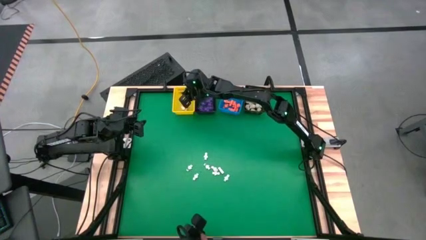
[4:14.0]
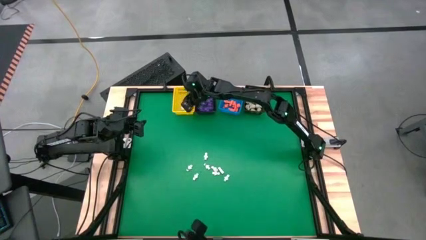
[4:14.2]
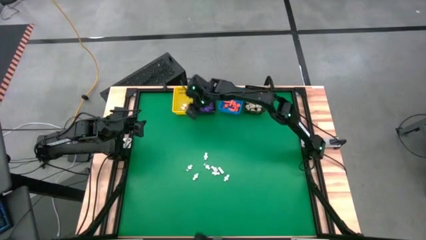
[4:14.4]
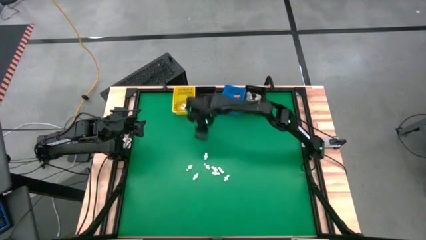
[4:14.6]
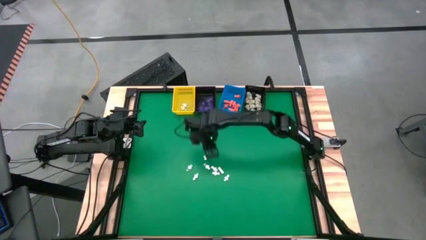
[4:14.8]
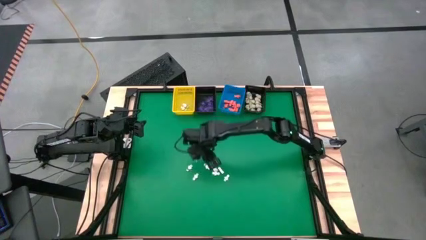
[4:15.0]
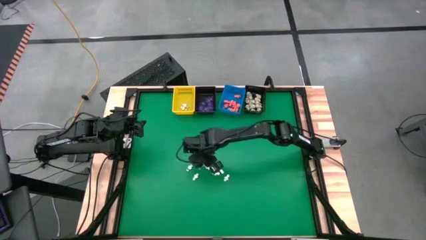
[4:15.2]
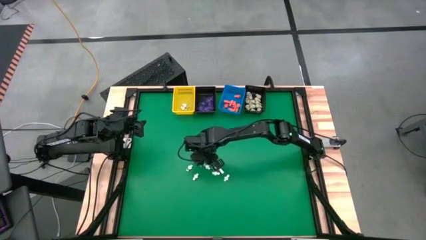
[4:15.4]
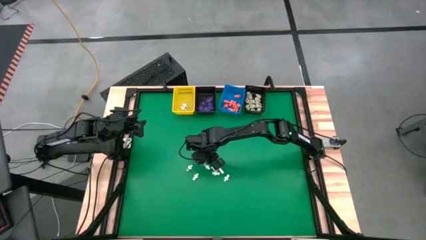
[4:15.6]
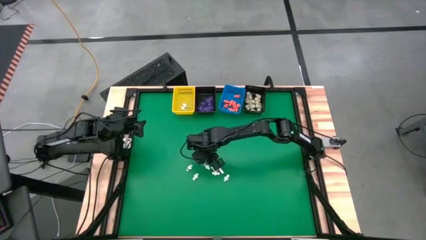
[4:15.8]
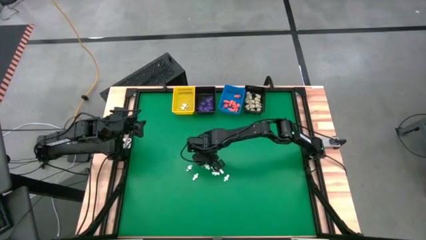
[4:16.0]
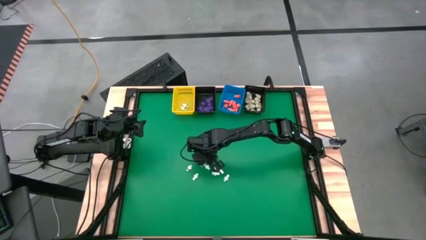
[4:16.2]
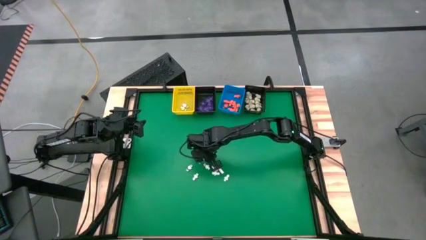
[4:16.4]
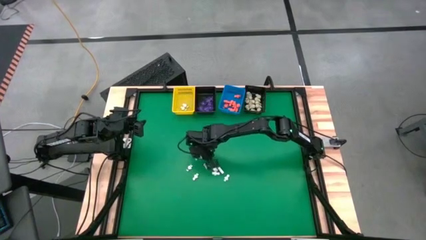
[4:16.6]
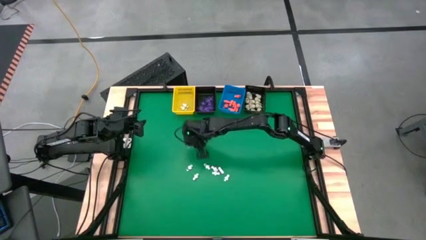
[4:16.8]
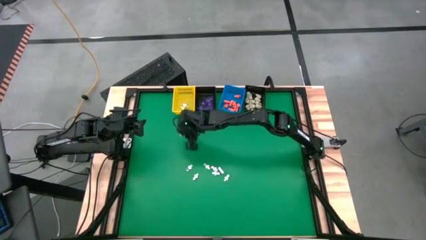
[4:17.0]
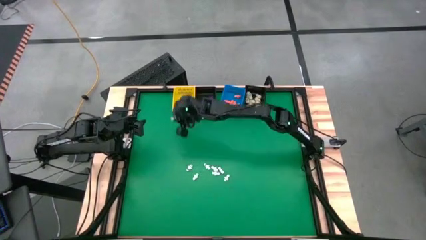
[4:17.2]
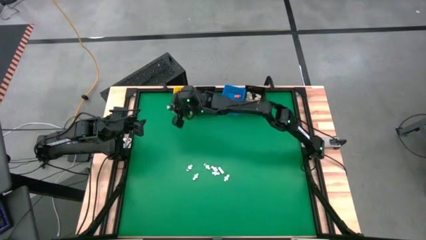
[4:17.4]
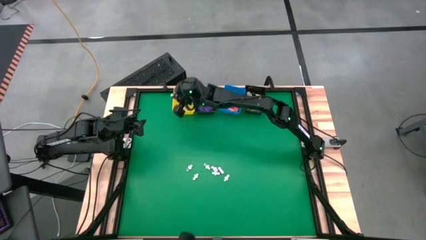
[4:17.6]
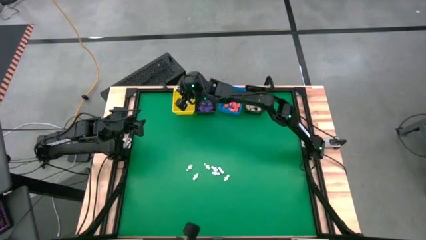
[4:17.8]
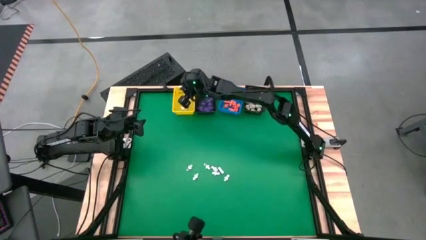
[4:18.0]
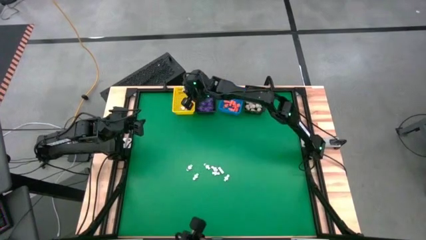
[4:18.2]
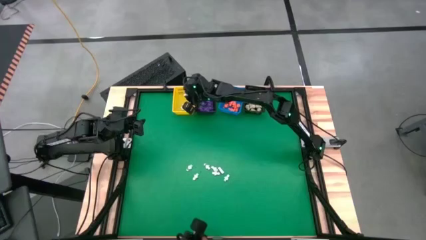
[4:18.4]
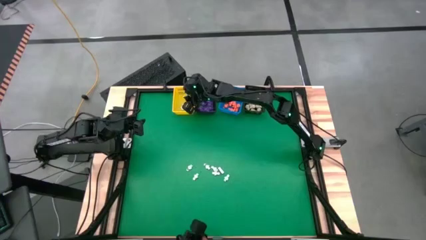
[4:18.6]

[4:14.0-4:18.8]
Task: Sort Halloween decoration
Put the white skeleton toy into the yellow basket

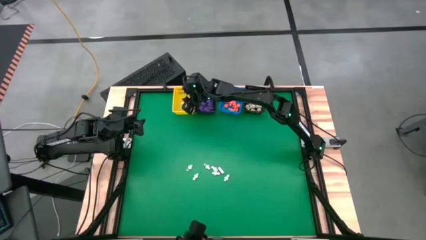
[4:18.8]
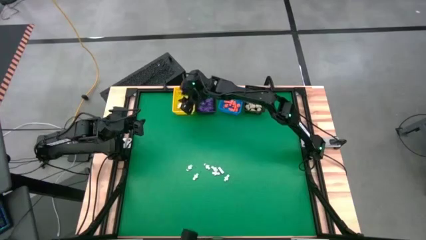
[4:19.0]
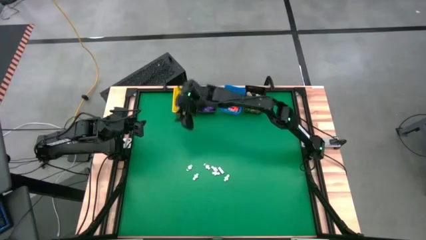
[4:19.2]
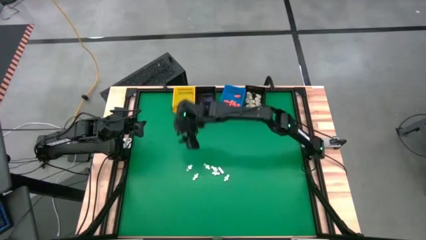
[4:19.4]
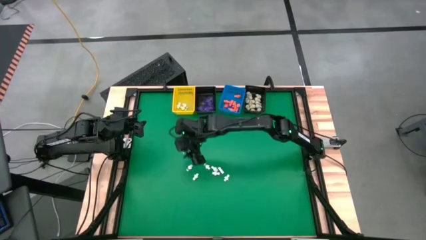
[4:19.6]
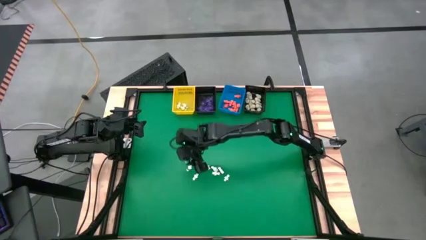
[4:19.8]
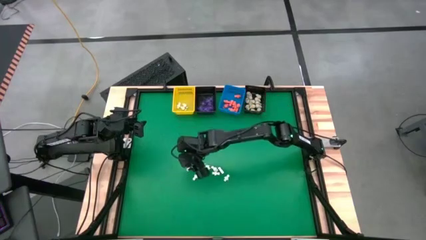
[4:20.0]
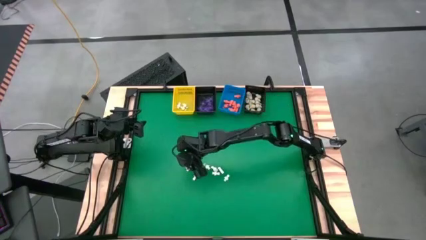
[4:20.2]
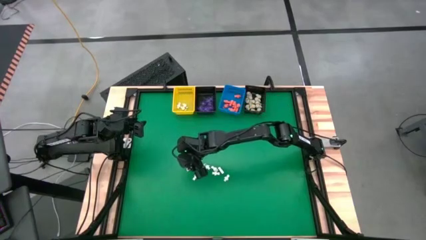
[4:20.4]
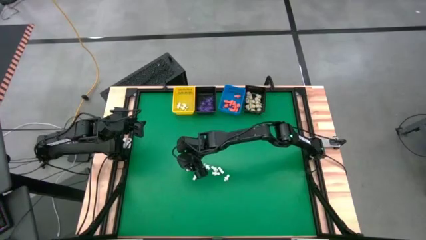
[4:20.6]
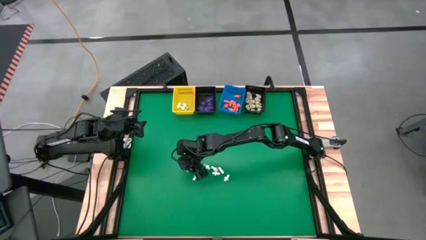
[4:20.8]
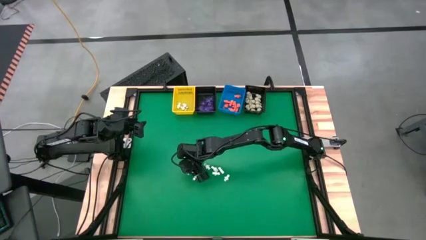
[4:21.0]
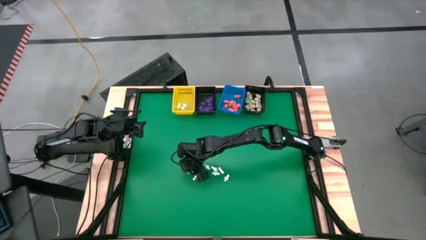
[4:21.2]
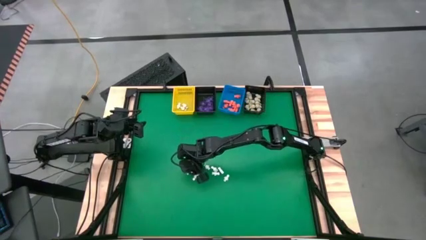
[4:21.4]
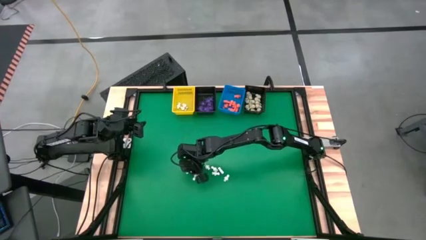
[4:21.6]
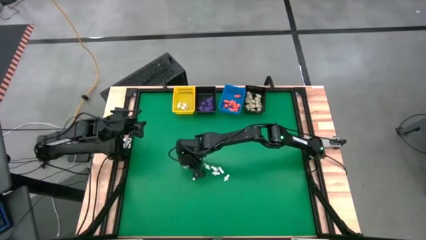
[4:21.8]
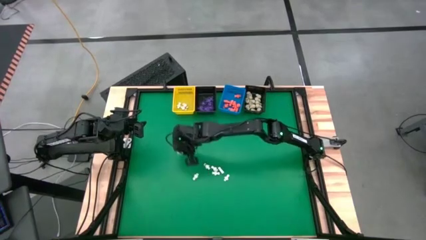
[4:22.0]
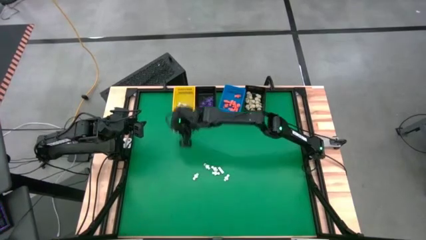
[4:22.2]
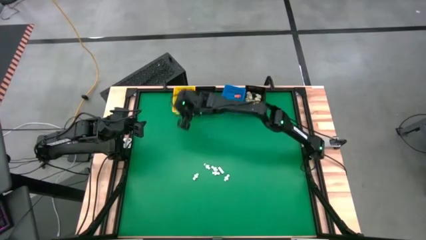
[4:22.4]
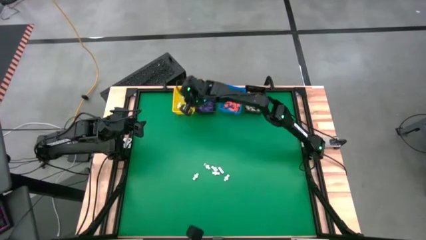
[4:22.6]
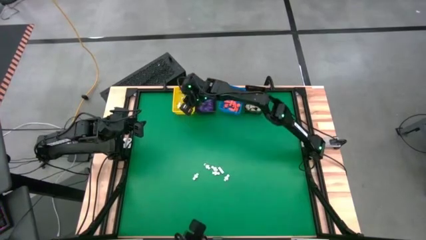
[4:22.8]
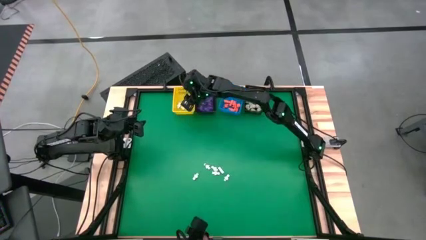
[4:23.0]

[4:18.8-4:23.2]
Put the white skeleton toy into the yellow basket

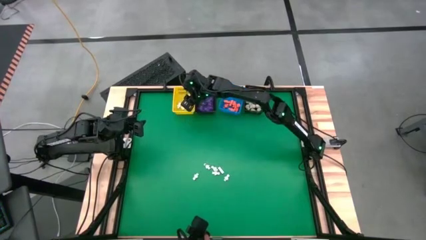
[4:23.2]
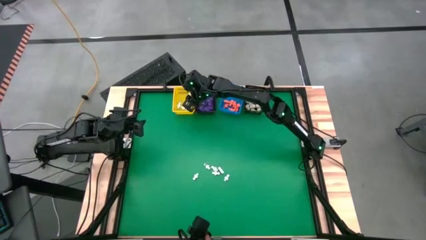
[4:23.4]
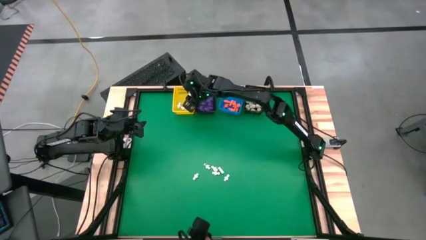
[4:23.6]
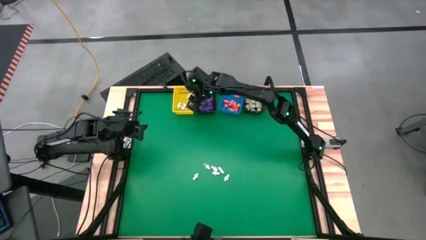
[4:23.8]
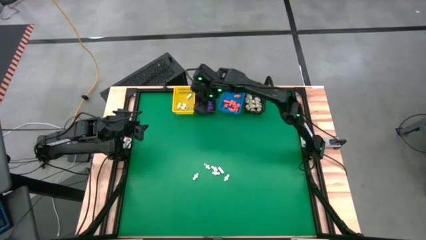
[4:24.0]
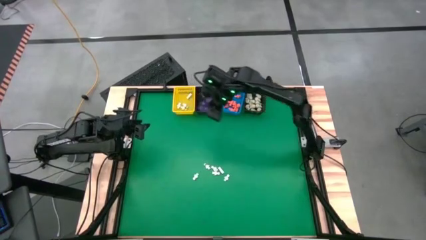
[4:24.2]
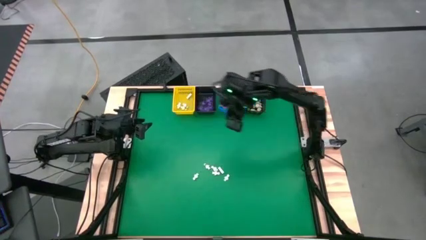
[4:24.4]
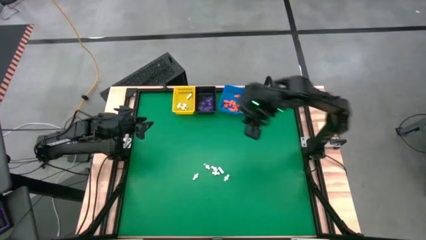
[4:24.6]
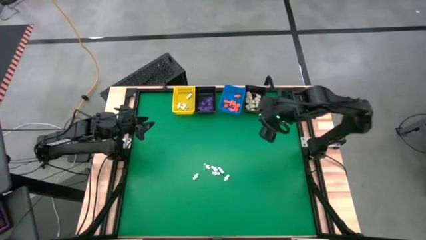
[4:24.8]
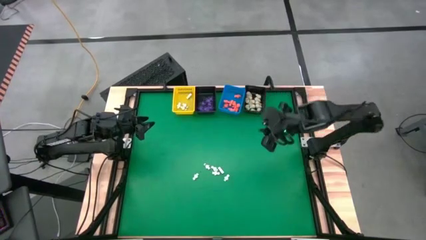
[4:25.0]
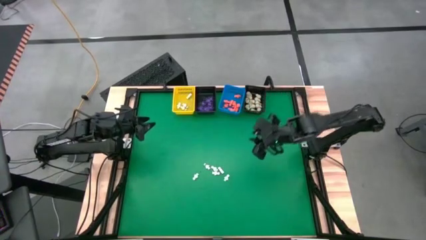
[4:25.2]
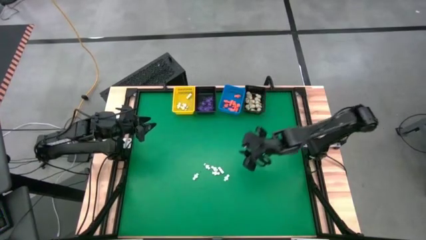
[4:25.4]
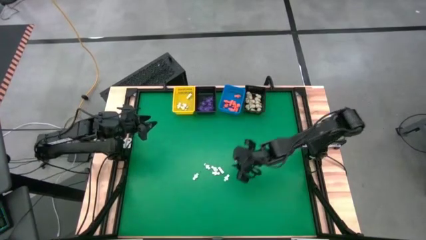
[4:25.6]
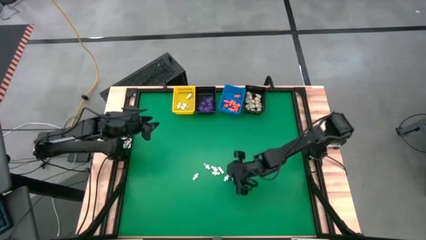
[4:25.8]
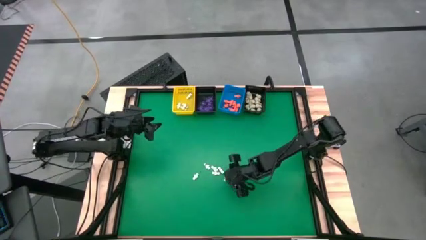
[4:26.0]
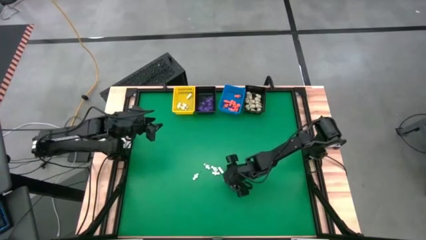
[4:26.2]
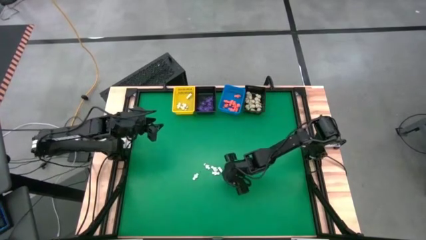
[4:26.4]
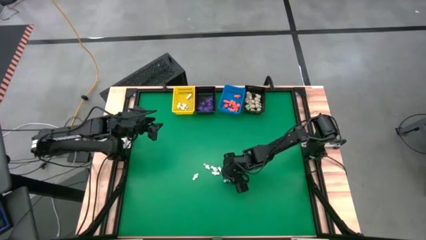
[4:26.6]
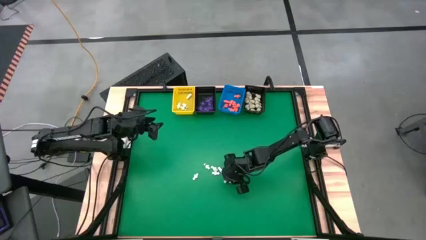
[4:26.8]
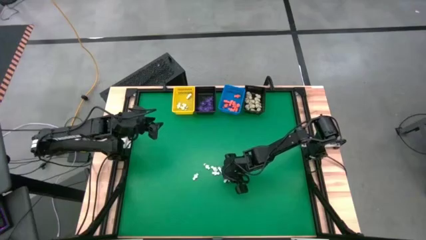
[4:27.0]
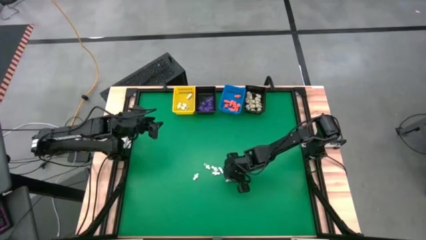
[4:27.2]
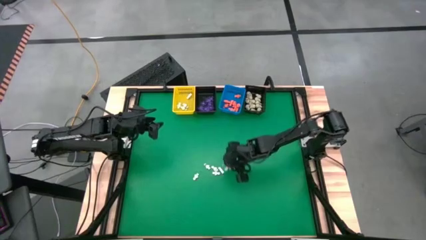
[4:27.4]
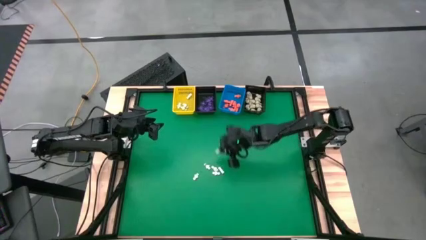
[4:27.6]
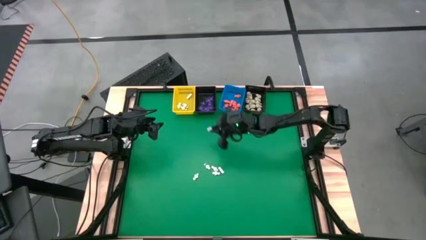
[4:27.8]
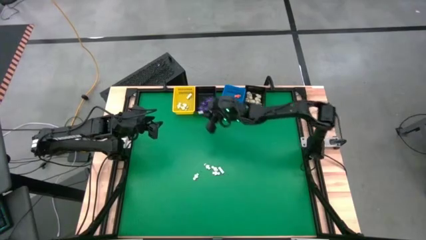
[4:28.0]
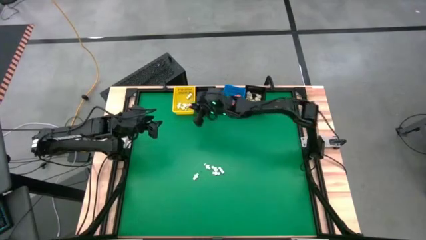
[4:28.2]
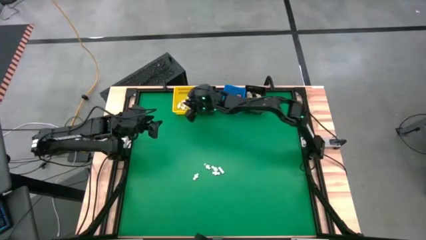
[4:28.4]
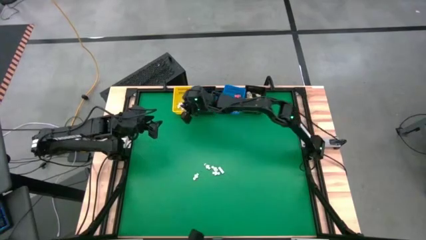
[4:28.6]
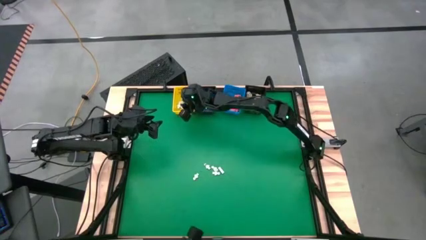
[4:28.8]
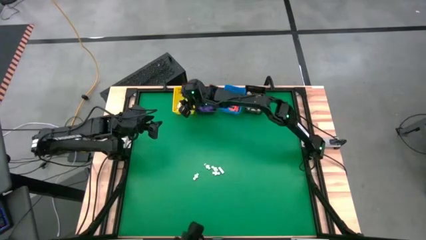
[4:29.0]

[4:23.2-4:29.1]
Put the white skeleton toy into the yellow basket

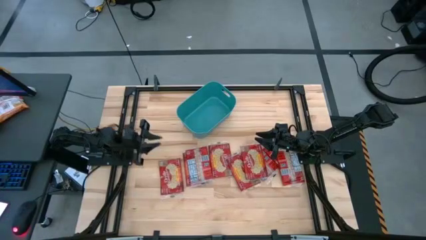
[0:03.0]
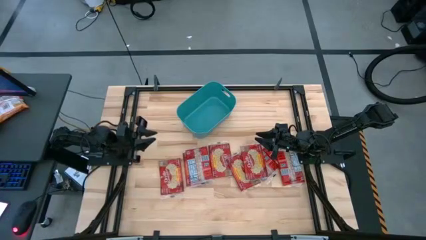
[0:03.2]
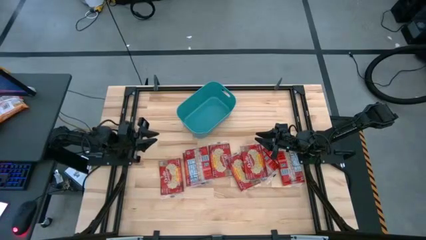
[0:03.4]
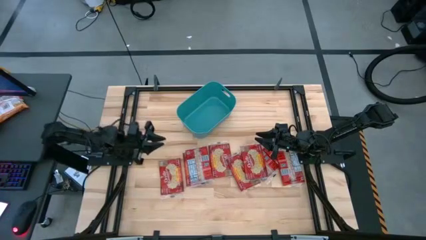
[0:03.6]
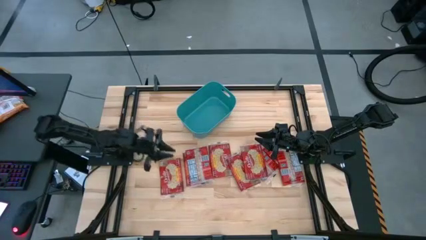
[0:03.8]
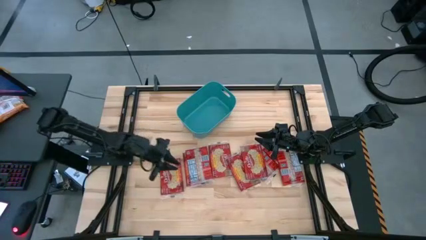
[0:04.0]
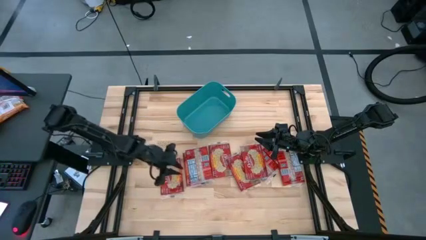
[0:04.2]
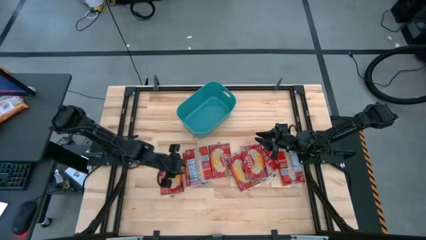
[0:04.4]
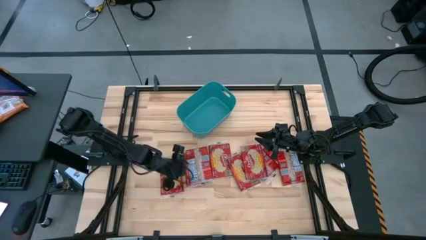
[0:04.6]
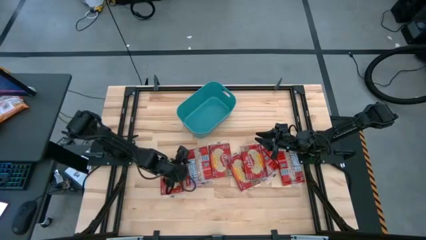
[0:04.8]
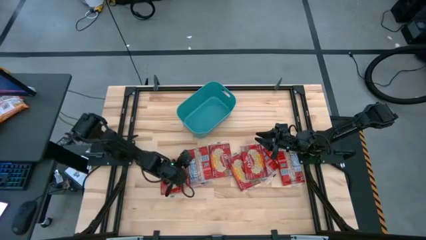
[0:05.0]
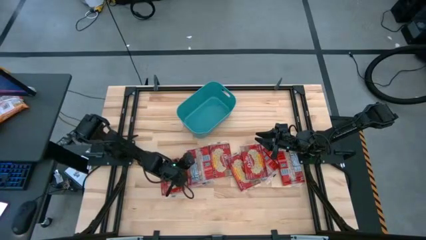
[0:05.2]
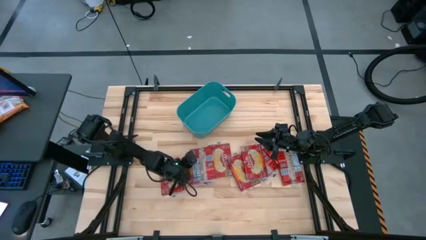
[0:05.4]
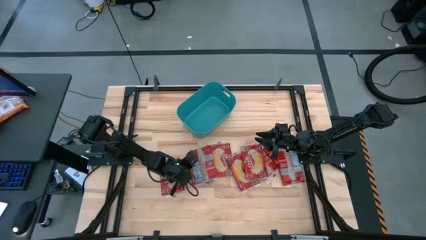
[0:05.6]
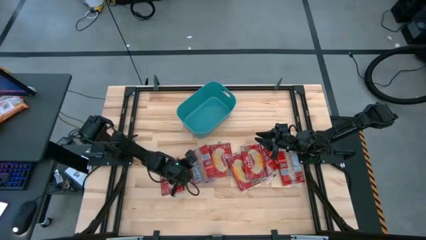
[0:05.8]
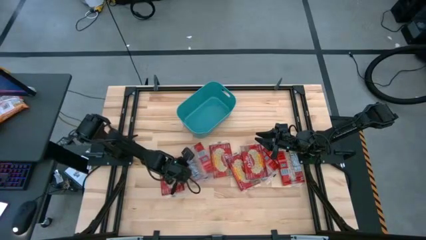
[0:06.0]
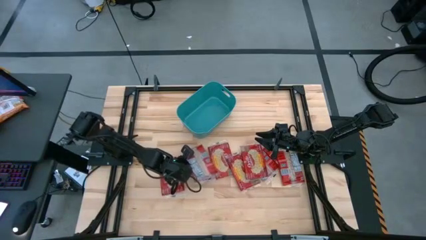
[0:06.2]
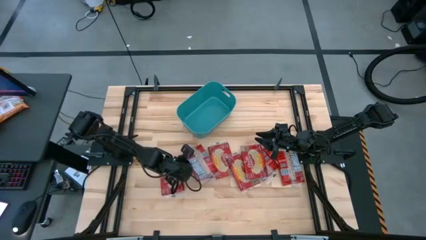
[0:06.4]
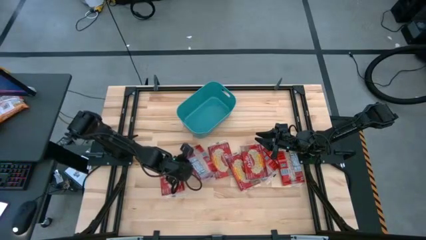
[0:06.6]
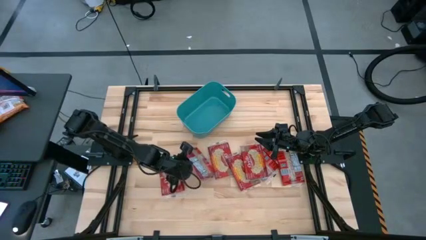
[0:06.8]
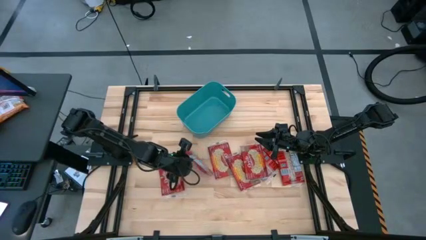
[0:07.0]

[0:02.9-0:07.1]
Task: Sort popcorn bags into baskets
Put the red popcorn bag into the green container
